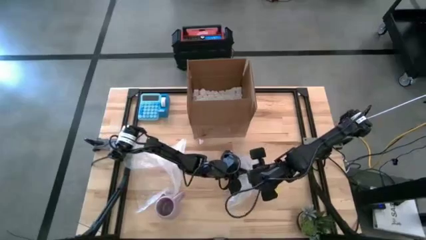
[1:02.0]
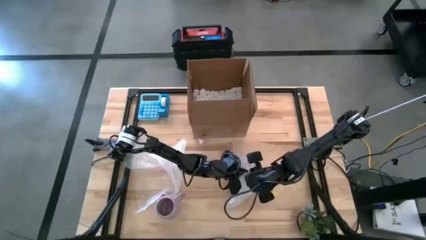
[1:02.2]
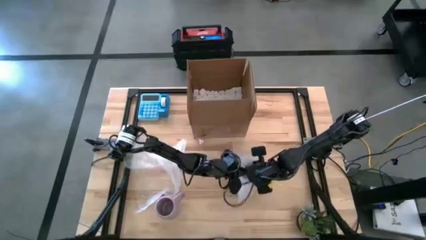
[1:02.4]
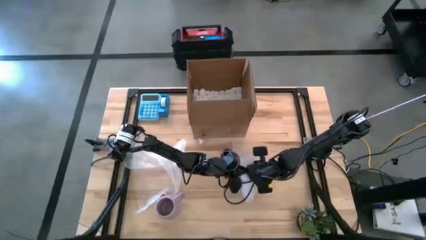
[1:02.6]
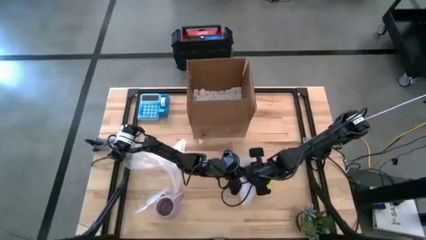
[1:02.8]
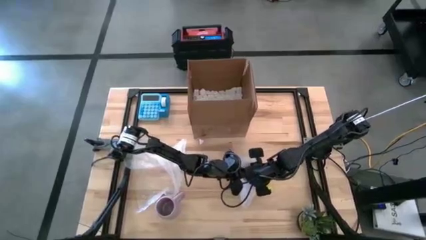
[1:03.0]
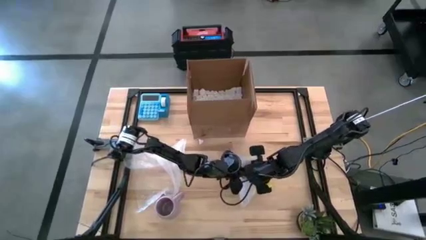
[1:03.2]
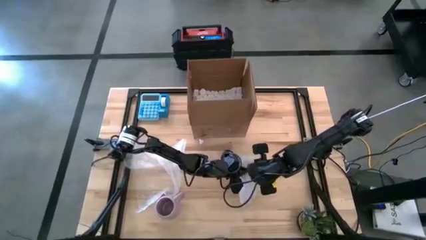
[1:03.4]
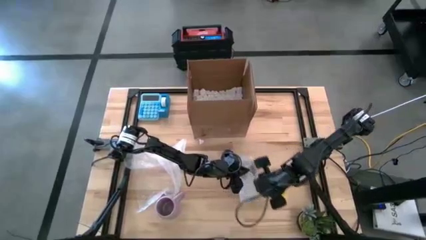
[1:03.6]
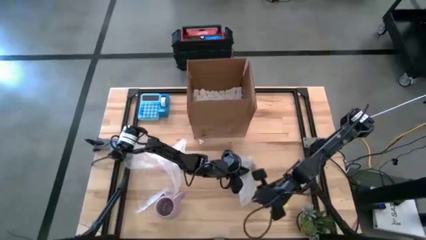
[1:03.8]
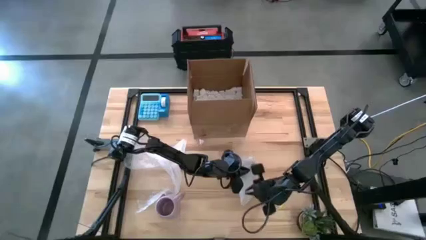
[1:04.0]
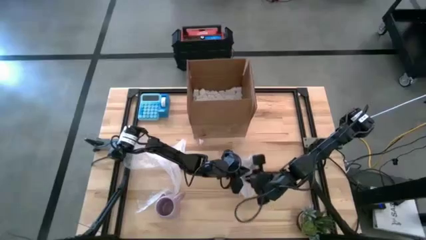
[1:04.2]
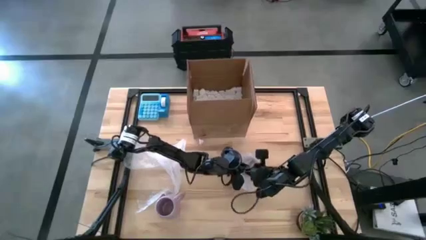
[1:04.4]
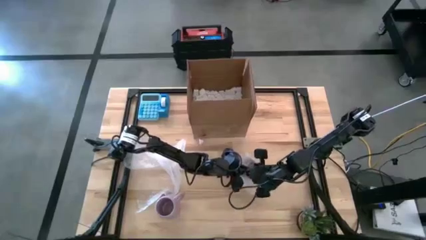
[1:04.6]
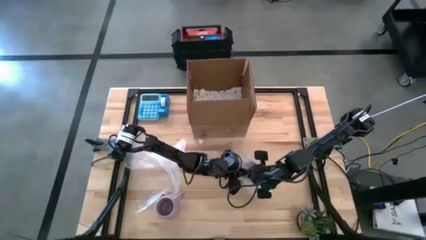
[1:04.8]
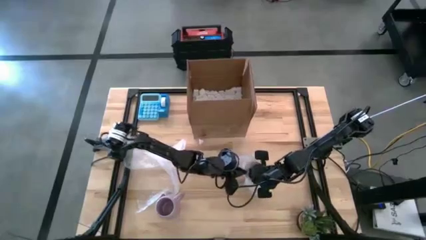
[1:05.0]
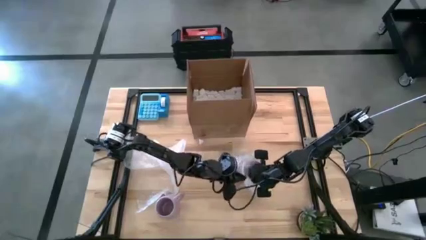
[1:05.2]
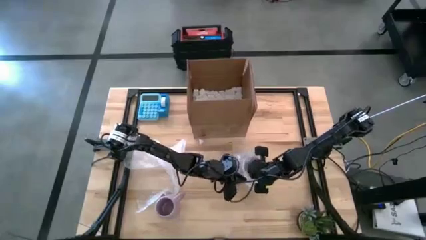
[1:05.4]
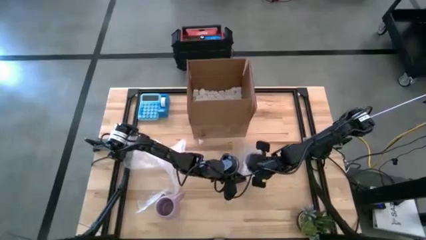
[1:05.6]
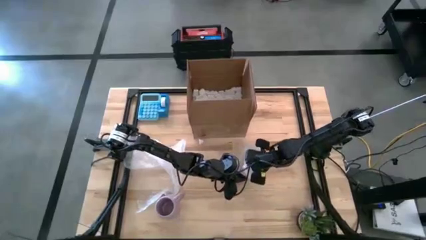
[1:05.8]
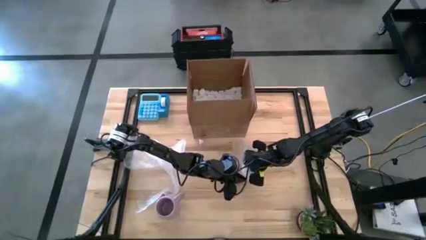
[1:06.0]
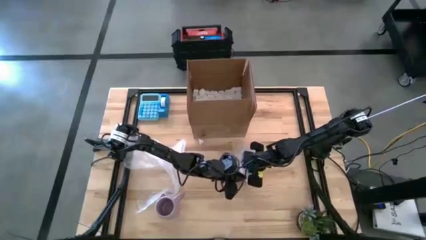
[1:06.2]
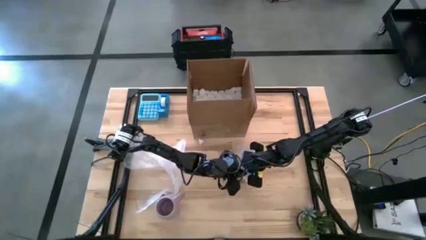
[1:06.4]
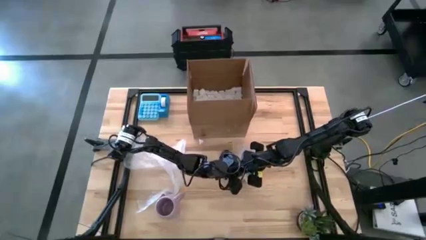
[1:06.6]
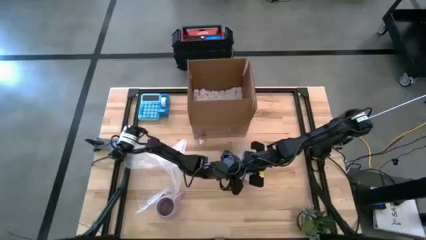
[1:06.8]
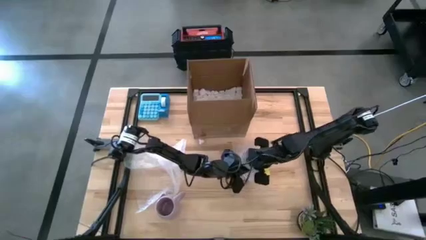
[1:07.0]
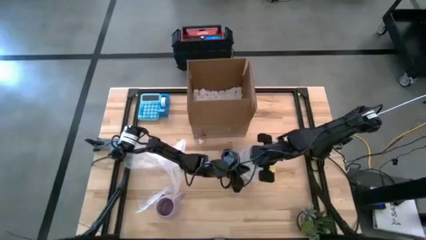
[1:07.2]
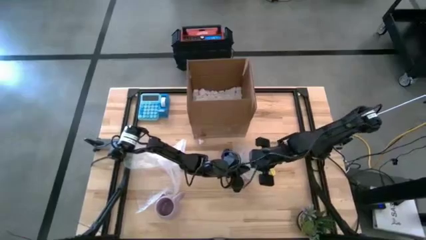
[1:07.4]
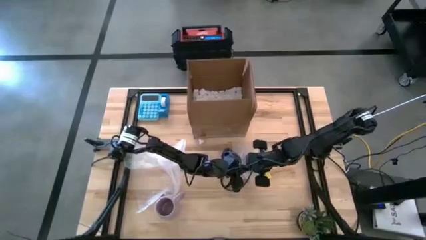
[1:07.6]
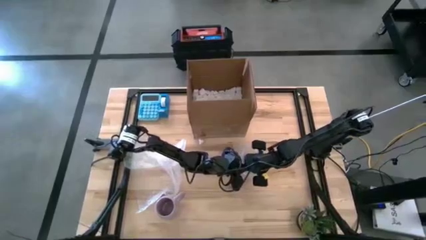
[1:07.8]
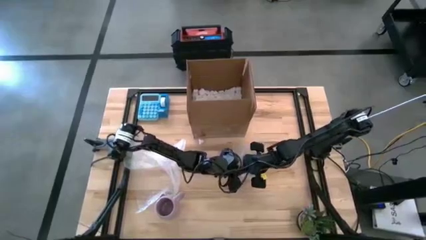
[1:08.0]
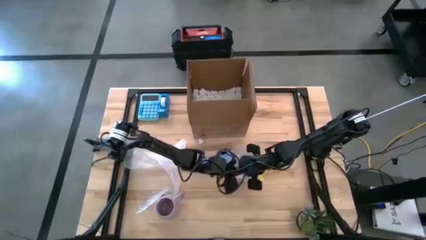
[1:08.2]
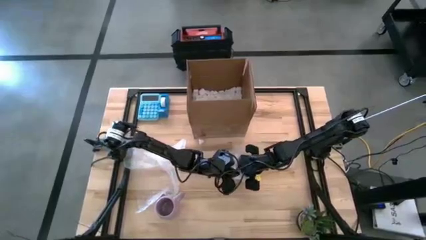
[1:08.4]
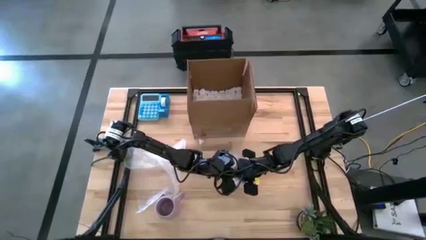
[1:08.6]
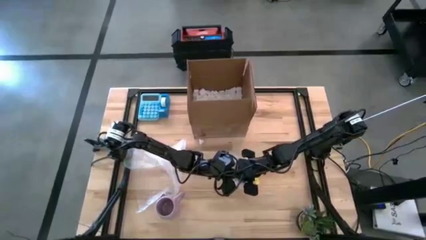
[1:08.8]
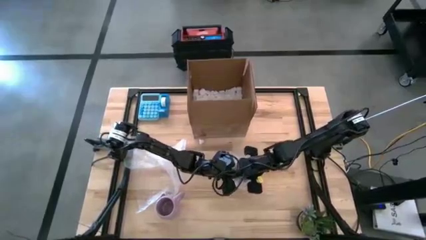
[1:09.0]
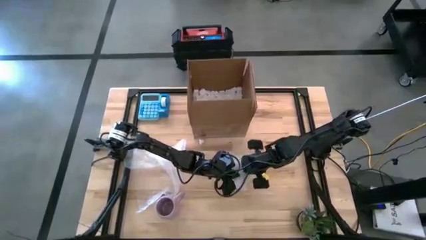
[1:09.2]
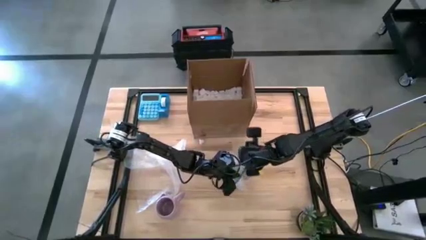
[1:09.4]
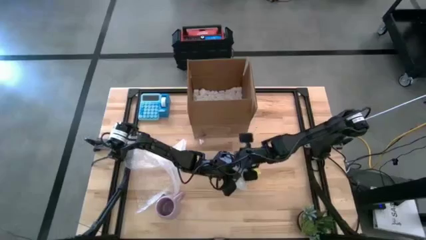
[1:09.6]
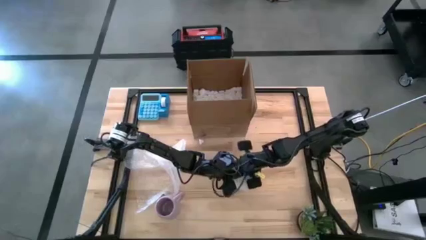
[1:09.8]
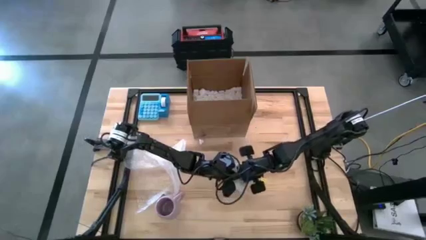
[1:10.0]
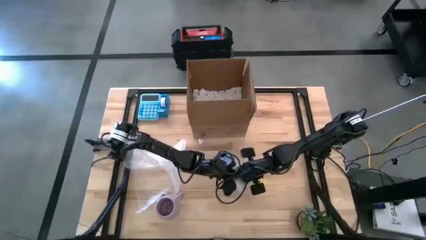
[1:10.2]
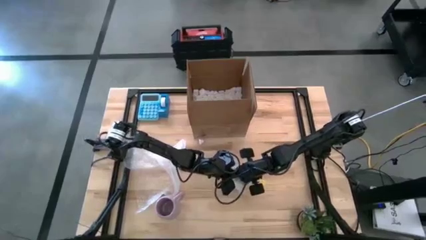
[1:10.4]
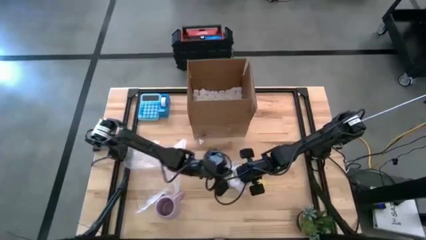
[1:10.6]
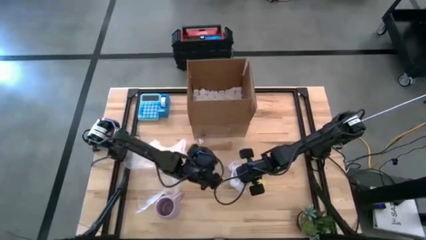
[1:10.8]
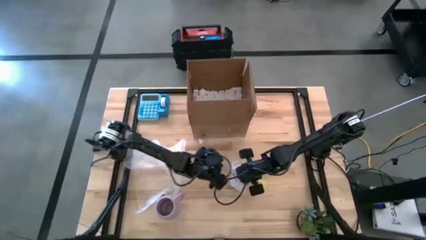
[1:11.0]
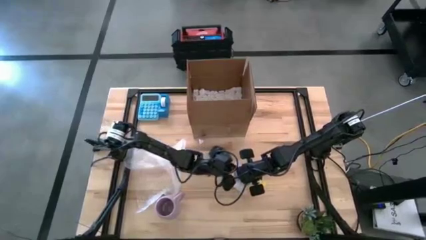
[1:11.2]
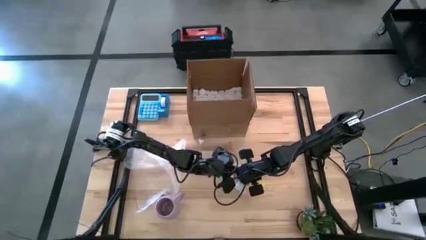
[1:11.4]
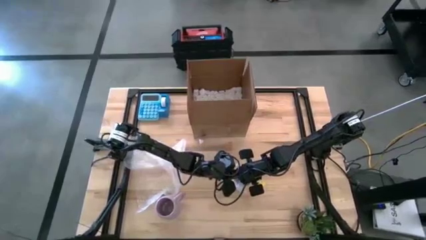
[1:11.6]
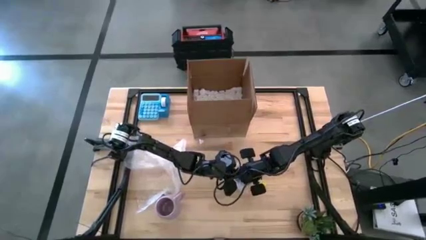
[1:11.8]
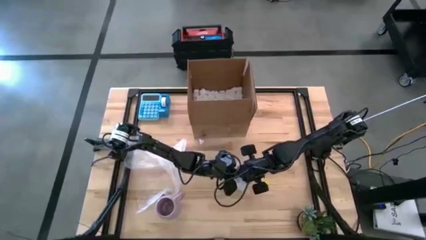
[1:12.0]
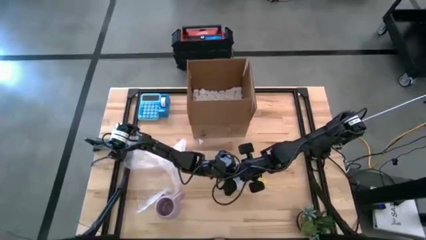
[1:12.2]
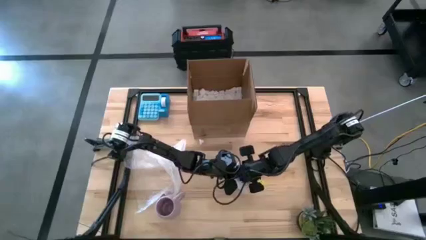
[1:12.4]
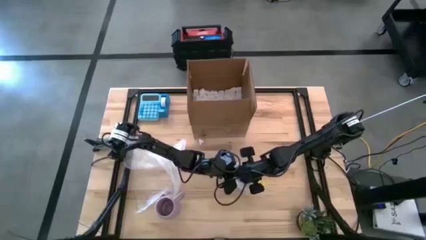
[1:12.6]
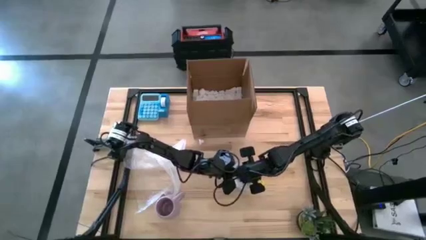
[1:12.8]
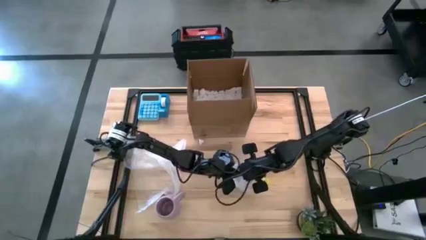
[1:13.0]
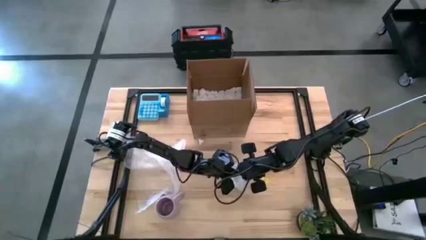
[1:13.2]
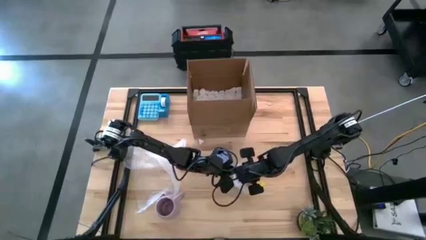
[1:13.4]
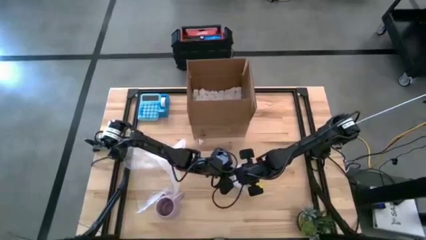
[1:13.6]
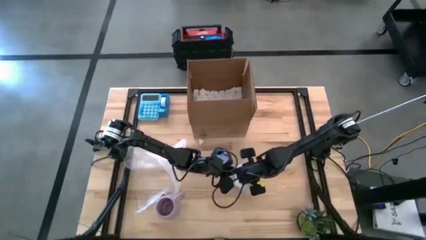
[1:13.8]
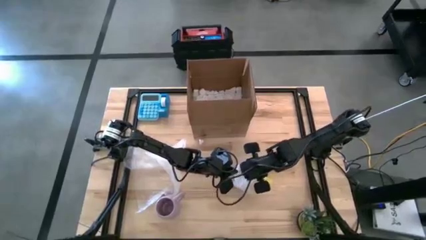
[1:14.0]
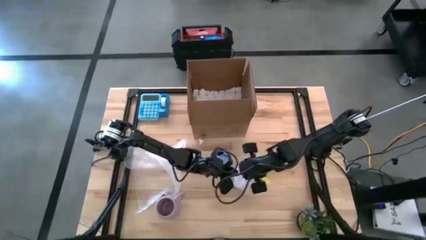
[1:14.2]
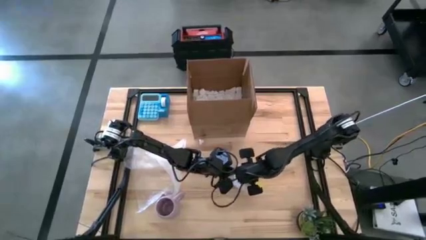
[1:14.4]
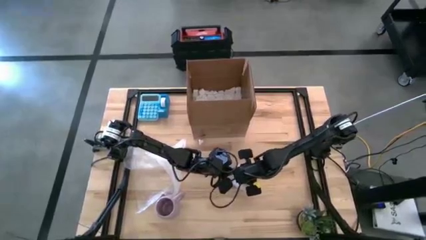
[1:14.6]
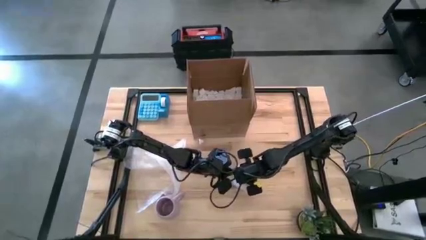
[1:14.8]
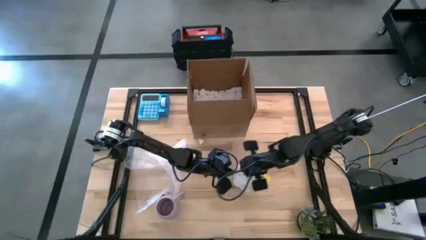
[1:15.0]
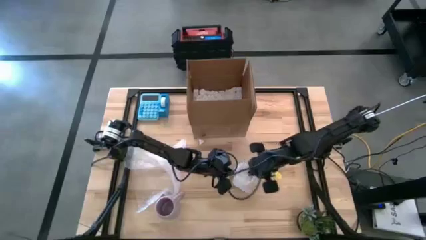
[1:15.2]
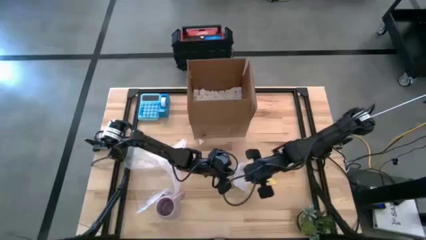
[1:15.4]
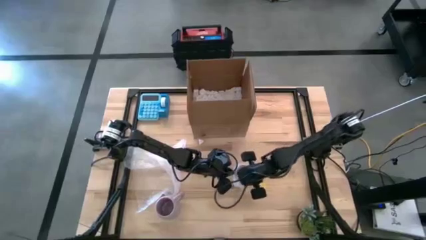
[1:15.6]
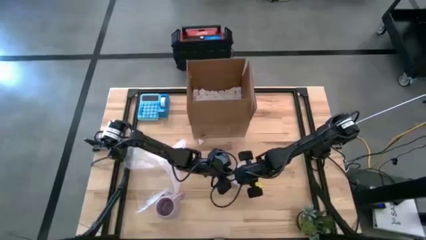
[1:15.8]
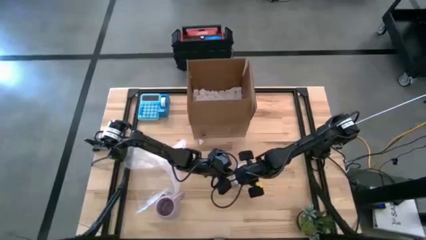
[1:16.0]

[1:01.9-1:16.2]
Task: wrap mug
Wrap the white mug with bubble wrap

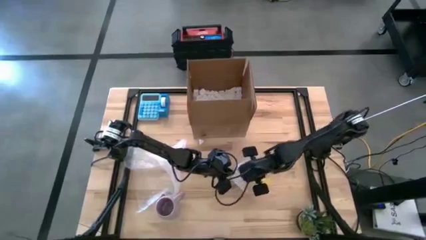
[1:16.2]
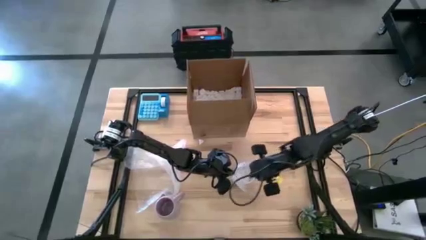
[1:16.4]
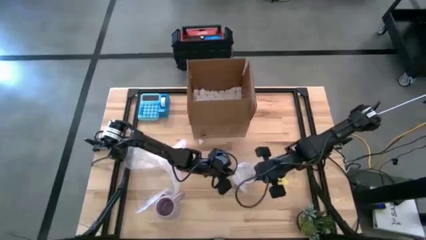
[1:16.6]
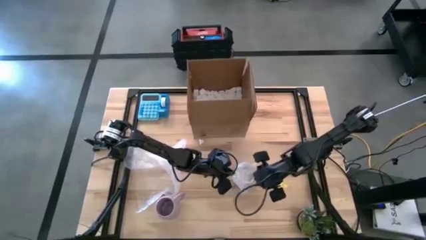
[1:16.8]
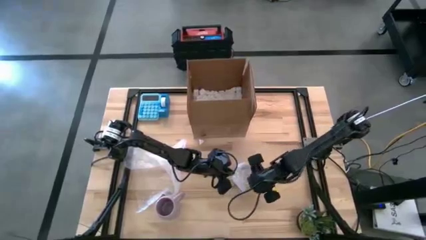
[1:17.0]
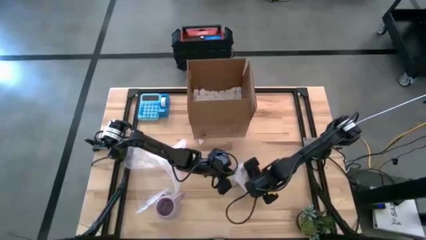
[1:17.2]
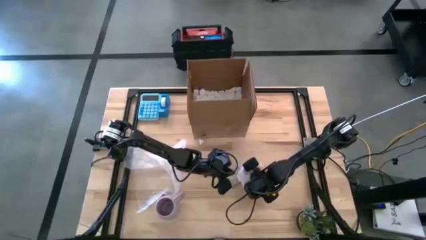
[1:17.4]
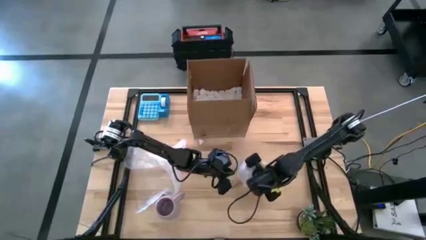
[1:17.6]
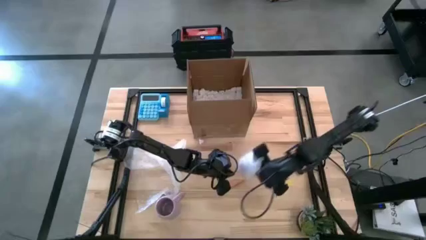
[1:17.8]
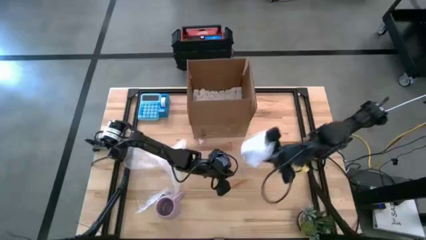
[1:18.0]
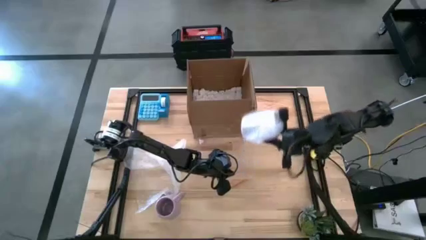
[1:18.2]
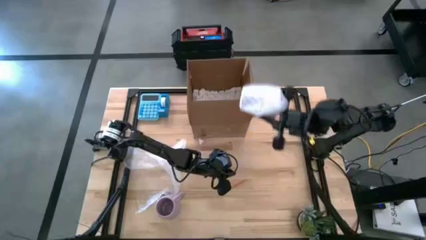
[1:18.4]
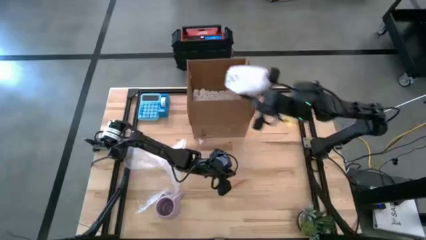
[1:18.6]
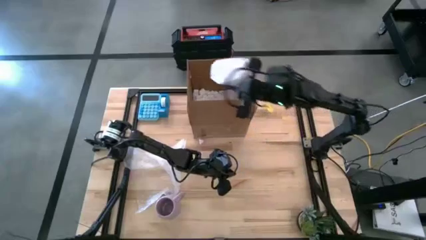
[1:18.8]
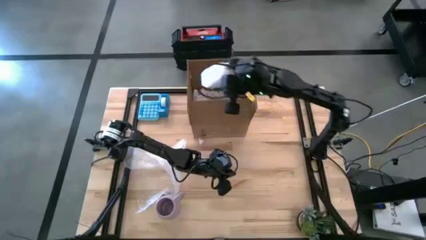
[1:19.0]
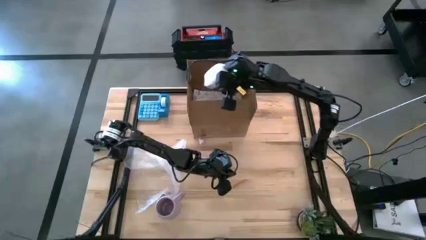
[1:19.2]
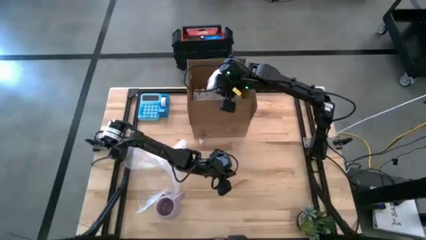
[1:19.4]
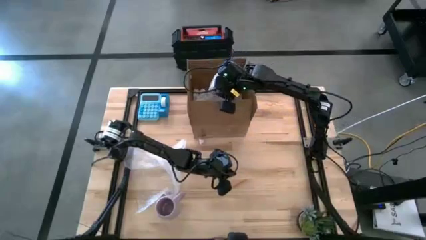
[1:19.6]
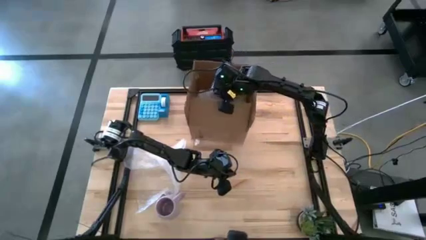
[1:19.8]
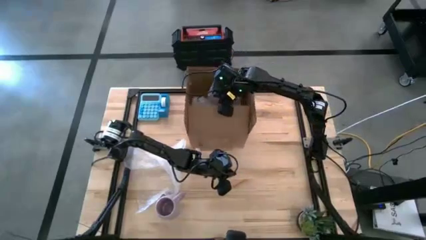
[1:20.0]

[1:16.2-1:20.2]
Put the white wrapped mug into the box
